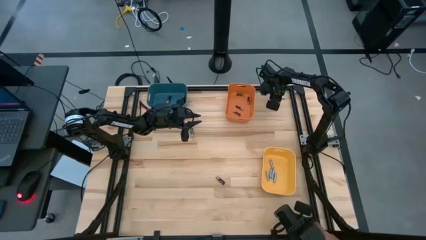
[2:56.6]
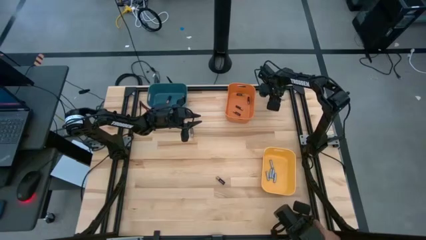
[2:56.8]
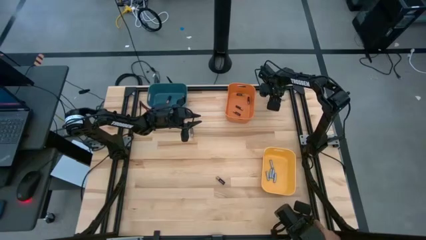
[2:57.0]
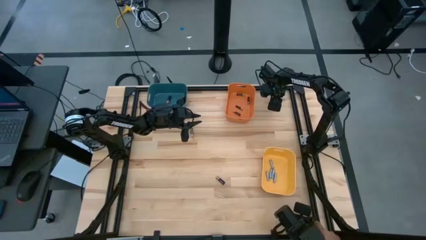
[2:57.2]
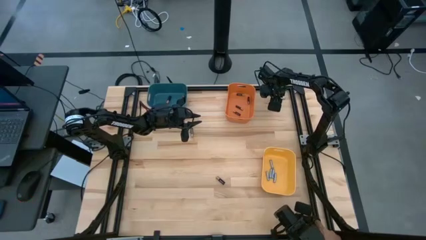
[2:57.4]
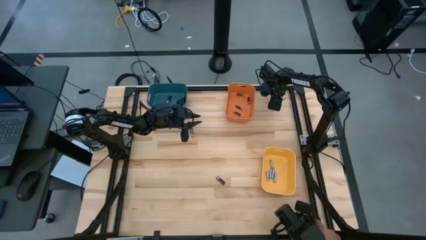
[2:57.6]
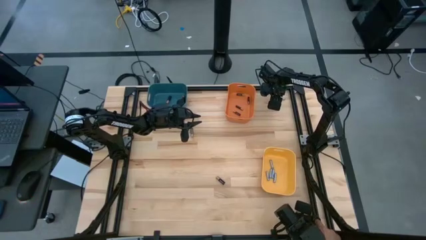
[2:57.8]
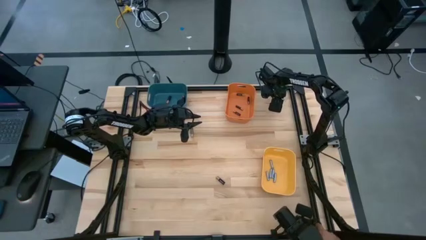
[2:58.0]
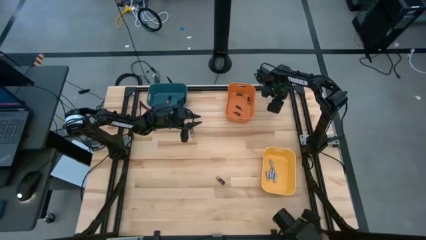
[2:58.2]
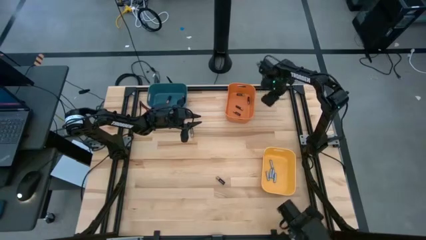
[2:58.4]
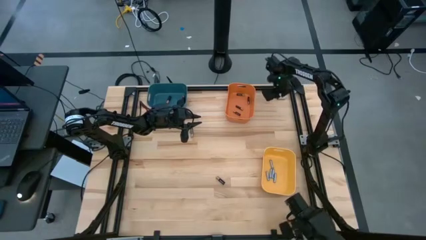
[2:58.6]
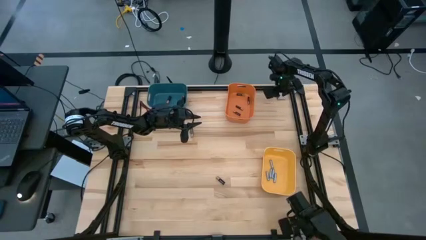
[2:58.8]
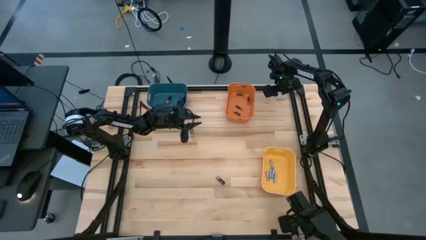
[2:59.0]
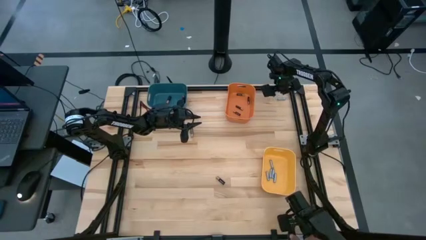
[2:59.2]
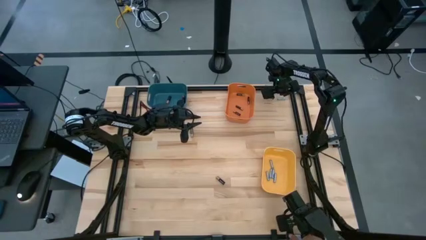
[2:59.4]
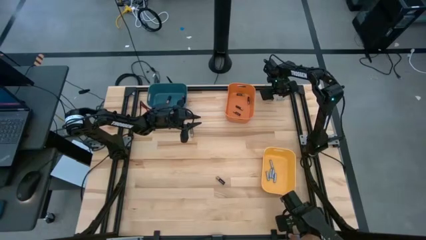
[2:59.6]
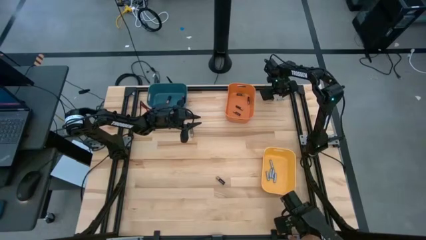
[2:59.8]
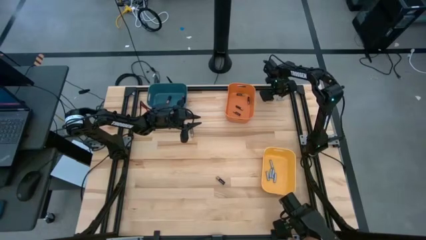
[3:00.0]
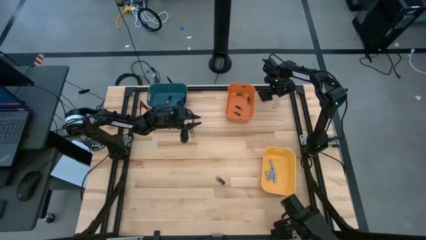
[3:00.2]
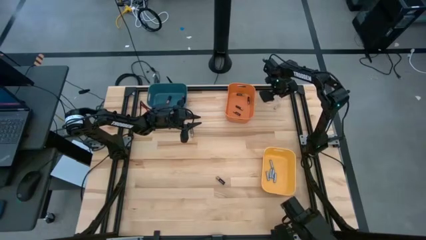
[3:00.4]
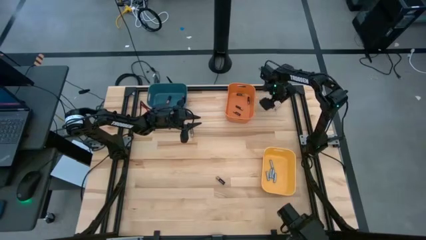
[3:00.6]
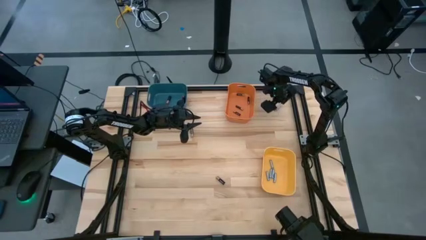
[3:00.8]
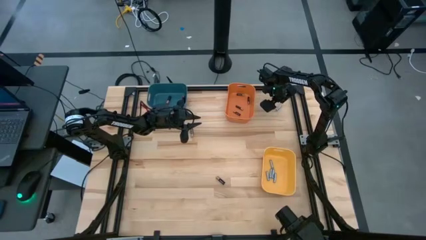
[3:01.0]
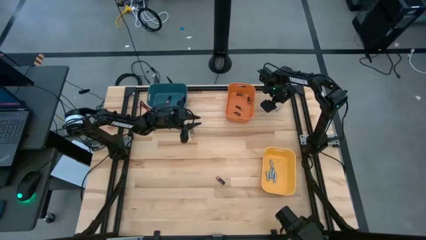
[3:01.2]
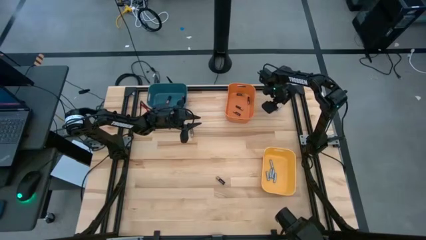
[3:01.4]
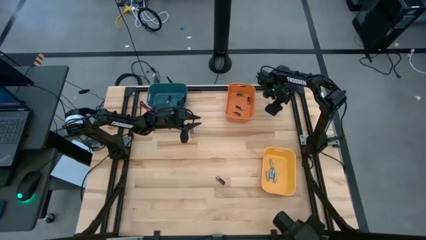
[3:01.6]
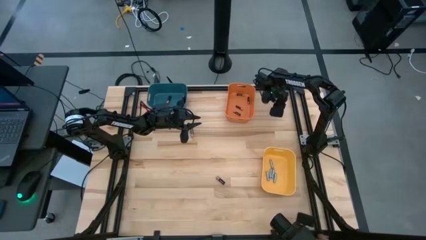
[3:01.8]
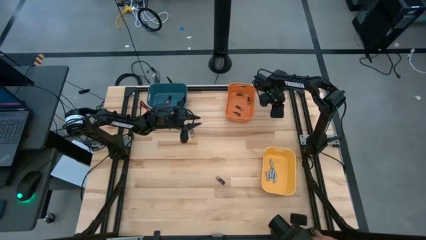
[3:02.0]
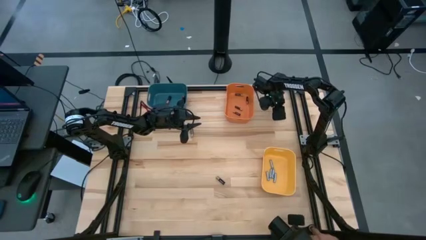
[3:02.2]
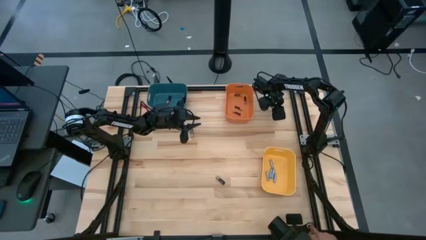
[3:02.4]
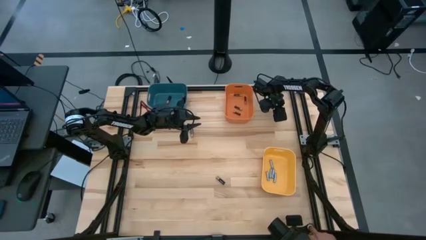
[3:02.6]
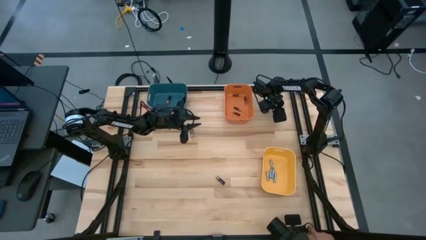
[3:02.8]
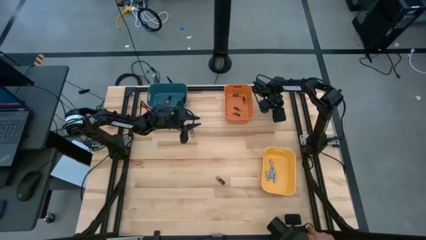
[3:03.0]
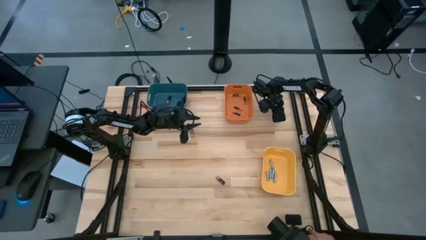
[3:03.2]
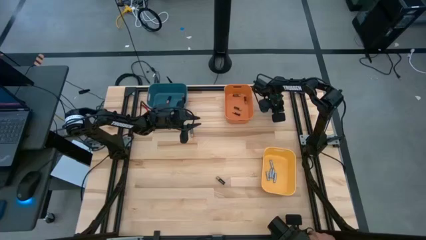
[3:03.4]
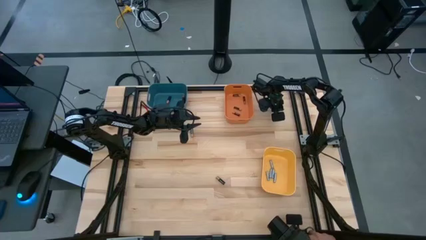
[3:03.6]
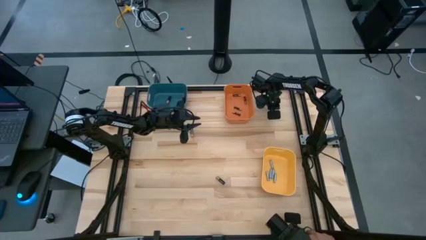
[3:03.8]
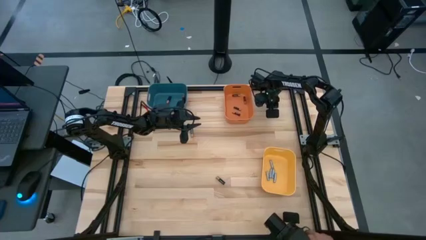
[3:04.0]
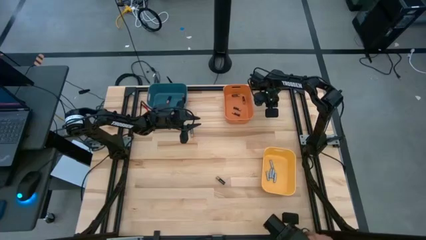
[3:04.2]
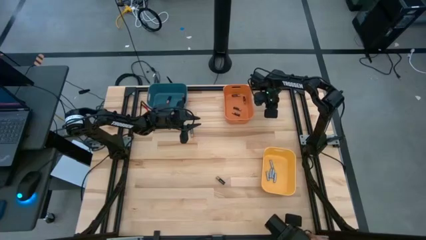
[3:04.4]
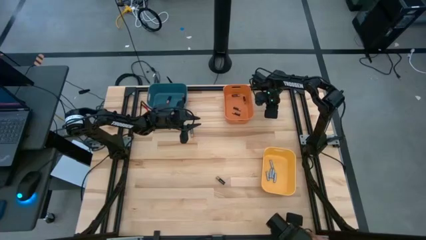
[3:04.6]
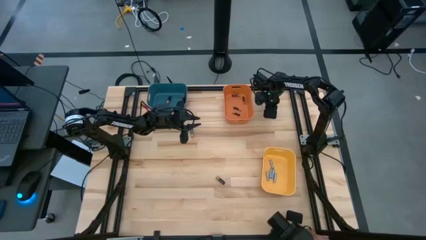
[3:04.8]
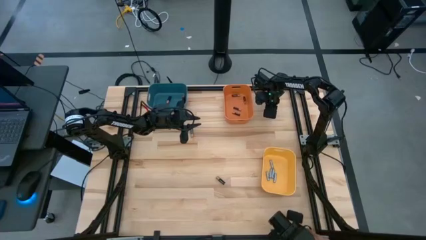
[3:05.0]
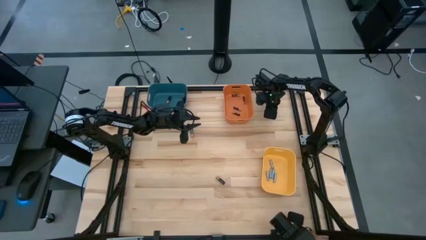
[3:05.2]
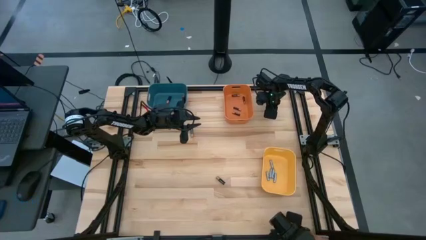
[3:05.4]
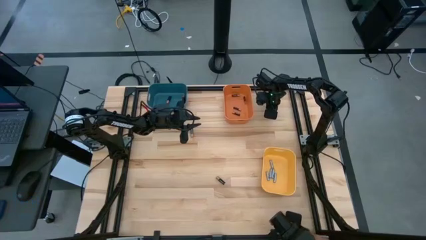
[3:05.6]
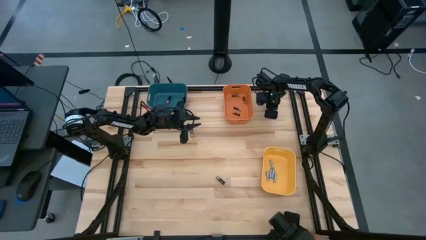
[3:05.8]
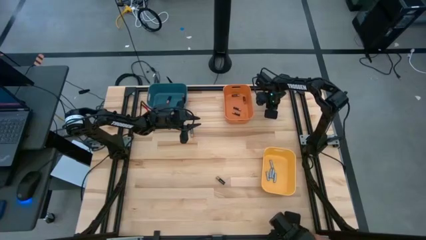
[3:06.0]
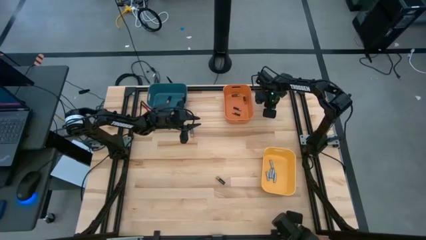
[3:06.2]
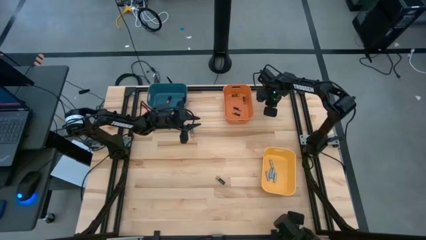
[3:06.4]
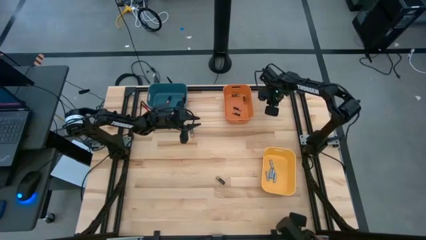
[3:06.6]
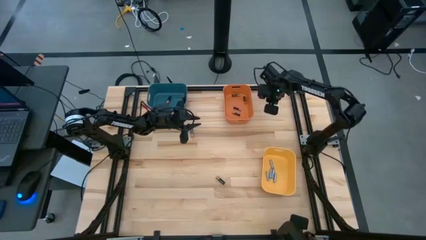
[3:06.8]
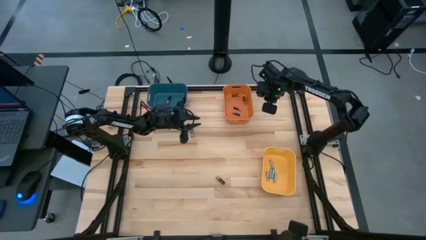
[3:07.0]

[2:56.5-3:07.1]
Task: Sort batteries
Put the silver battery into the yellow bin
